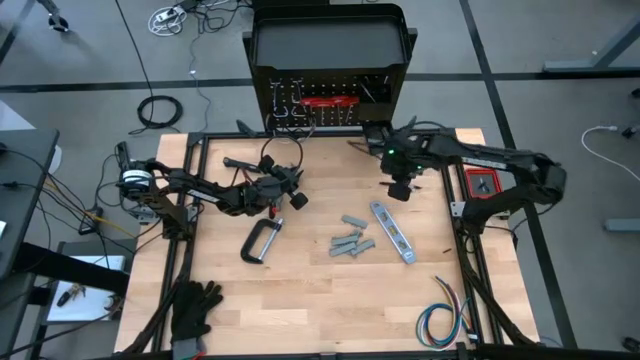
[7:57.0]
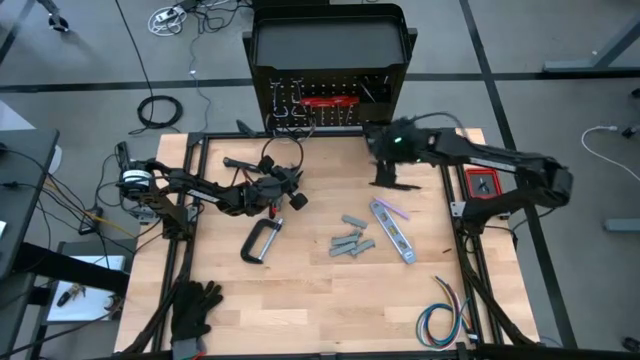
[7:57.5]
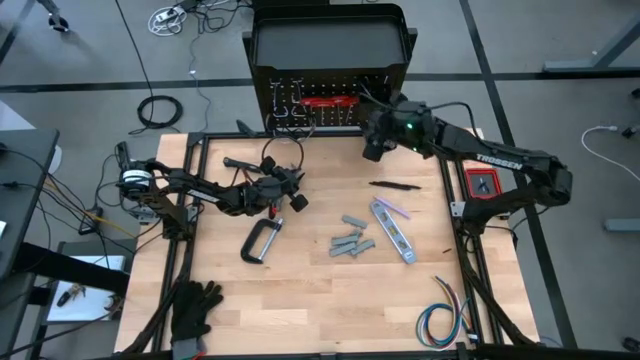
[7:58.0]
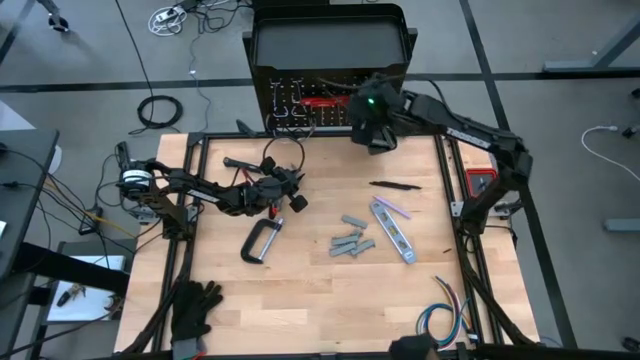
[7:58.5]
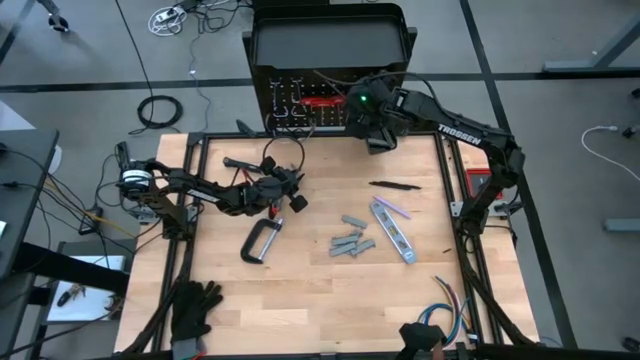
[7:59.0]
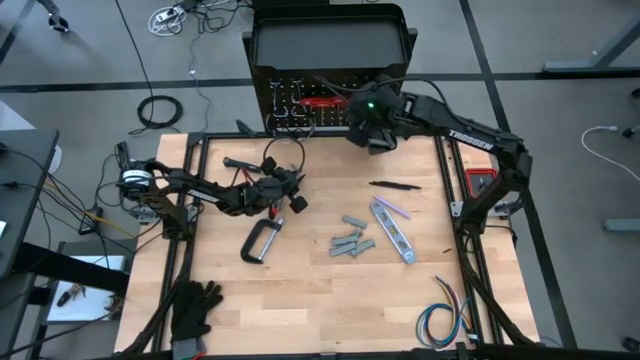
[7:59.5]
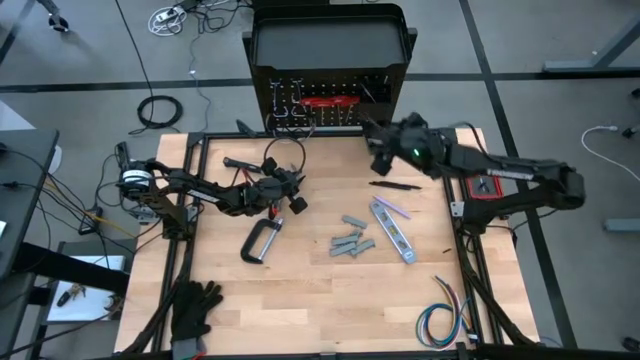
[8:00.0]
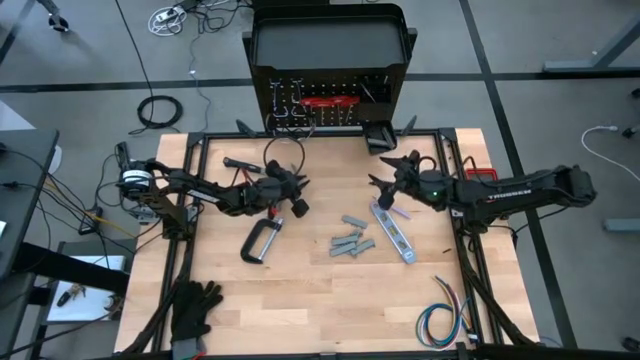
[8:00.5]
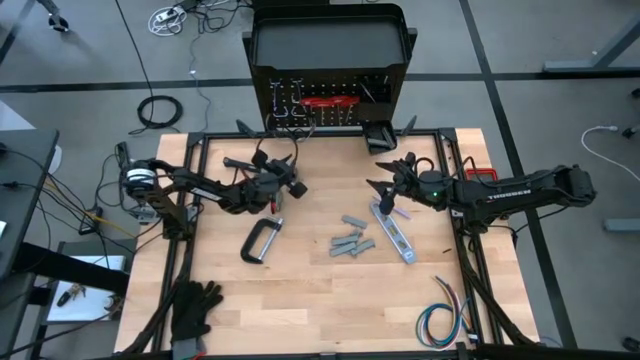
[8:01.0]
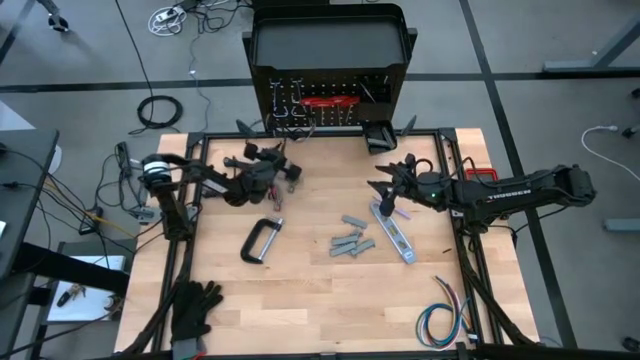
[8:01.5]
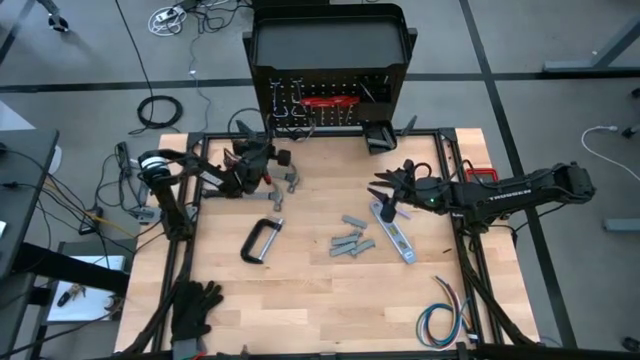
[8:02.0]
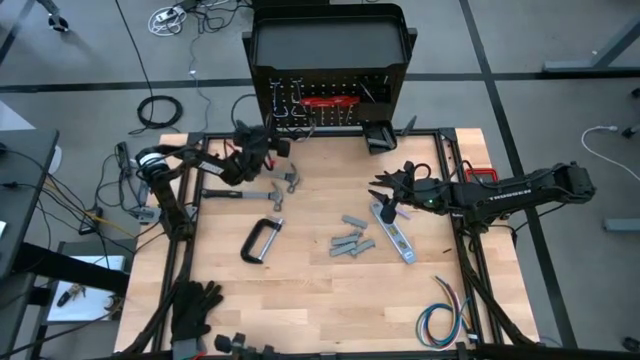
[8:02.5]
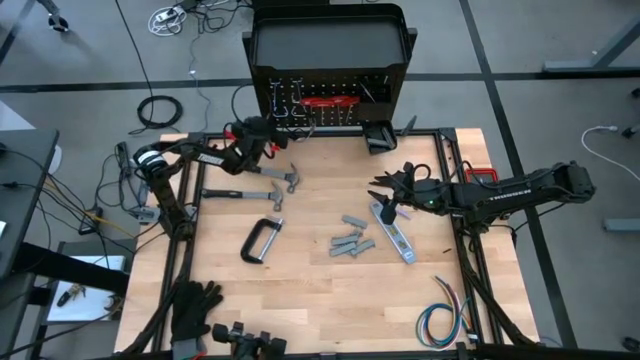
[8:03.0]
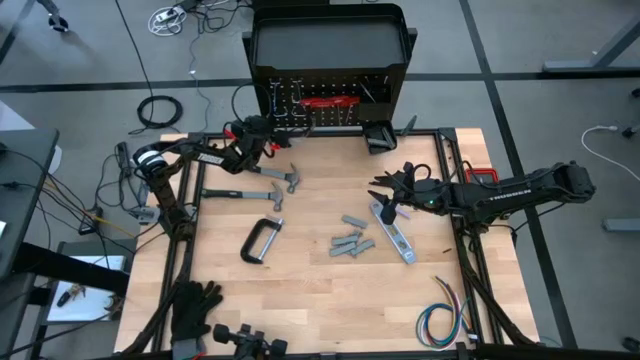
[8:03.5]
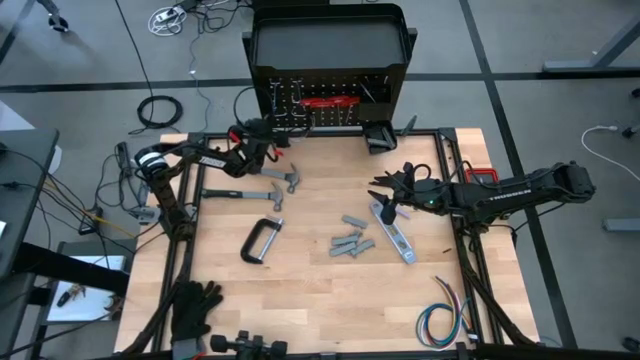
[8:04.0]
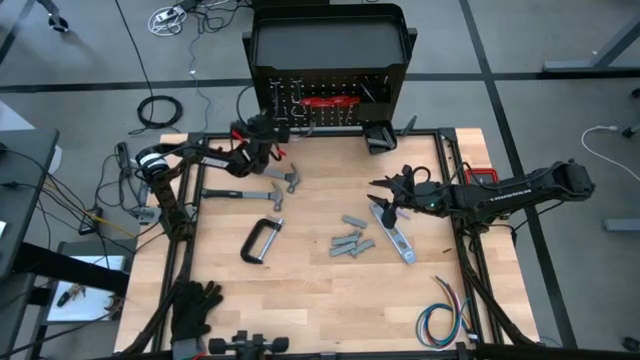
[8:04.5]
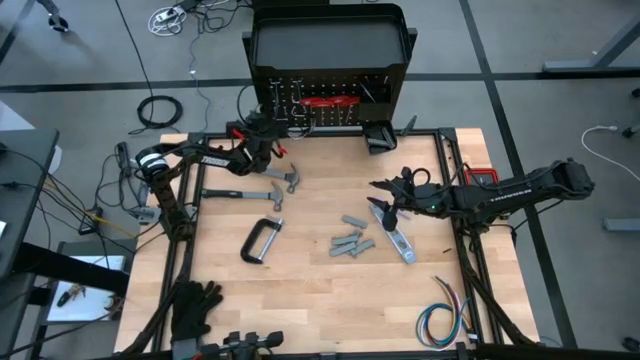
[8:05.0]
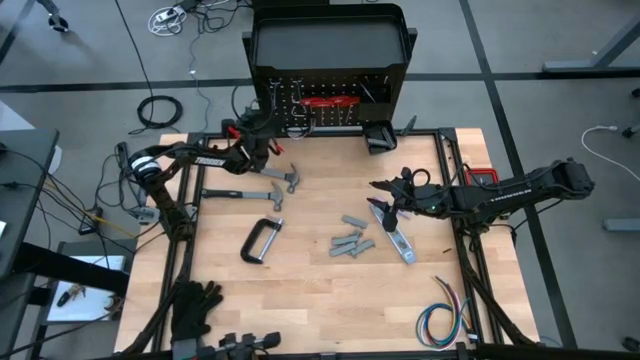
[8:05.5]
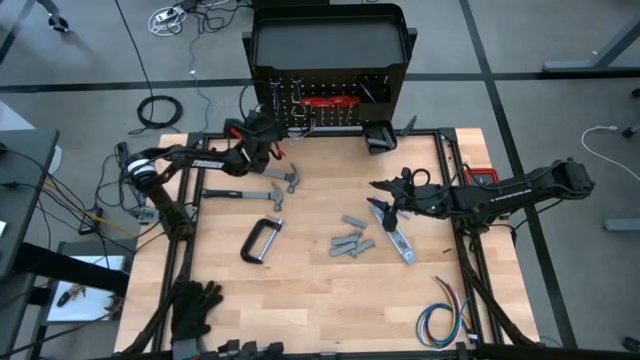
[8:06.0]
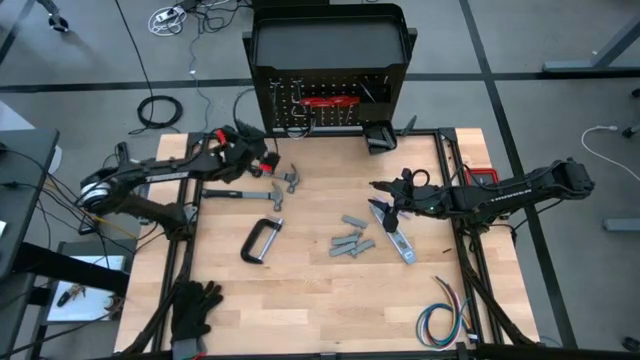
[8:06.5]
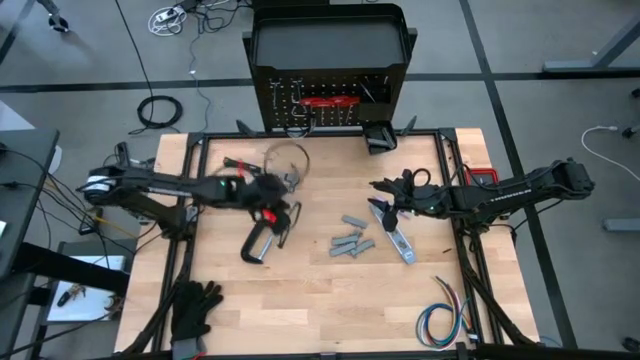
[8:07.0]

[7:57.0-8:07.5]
Task: Hang tools onto peg board
Unhang the left glasses

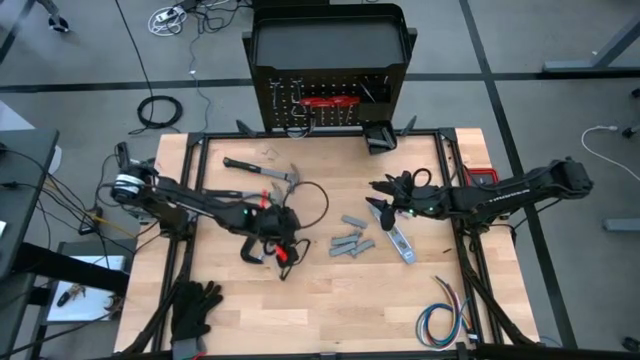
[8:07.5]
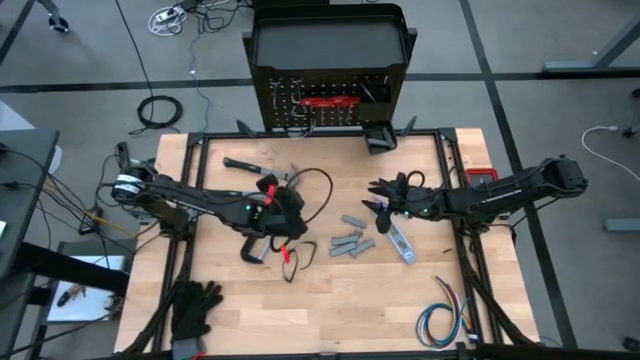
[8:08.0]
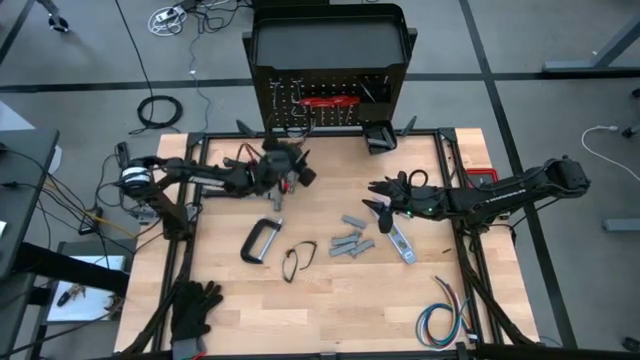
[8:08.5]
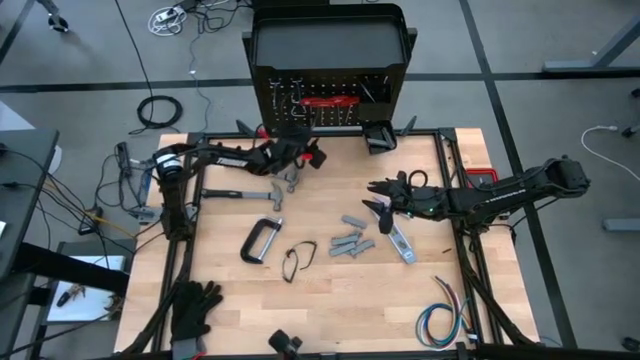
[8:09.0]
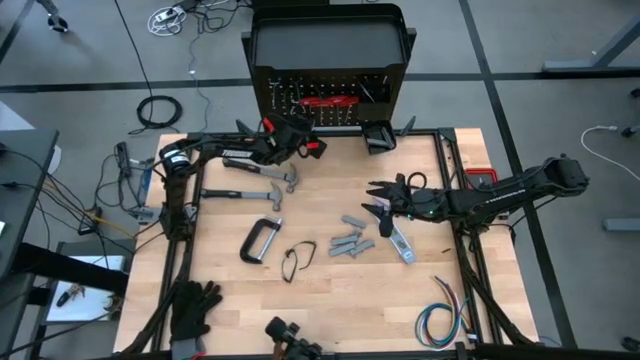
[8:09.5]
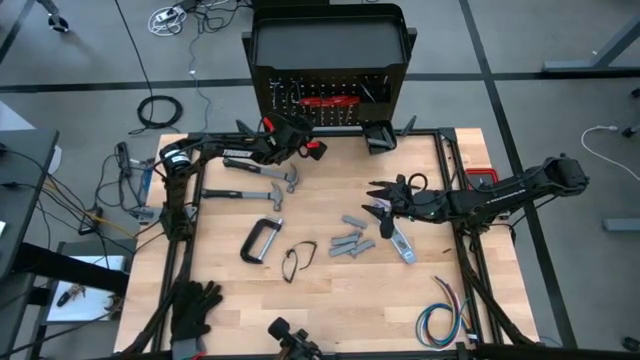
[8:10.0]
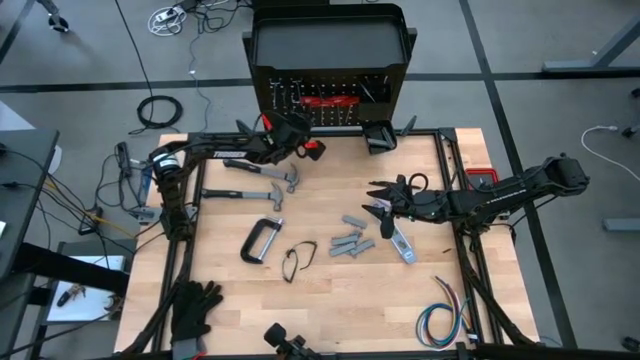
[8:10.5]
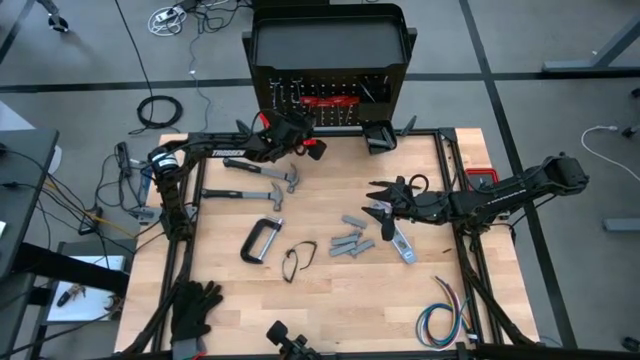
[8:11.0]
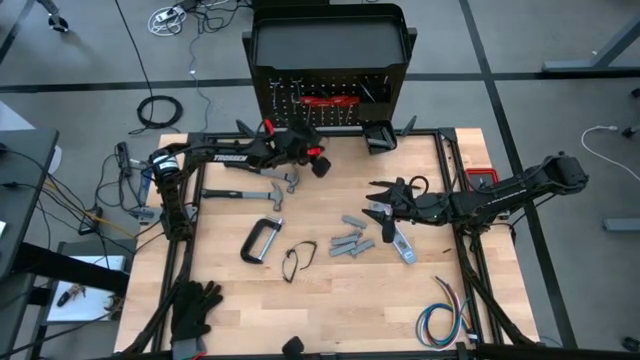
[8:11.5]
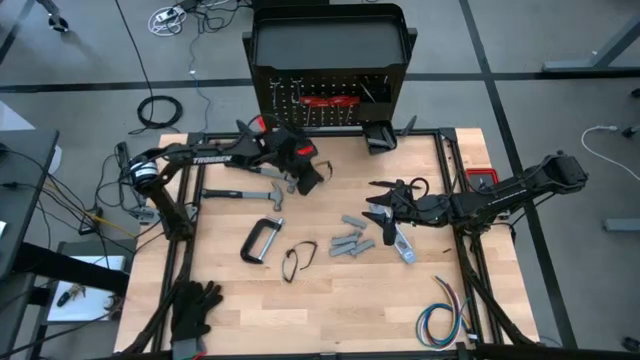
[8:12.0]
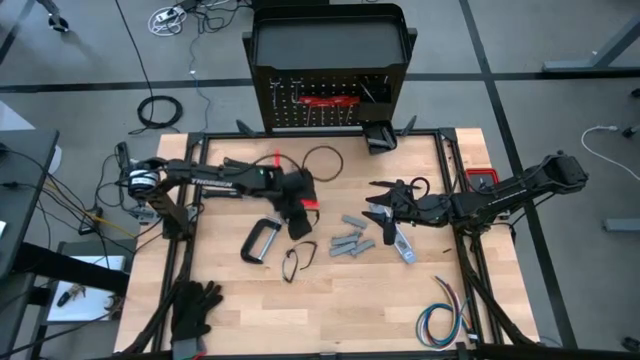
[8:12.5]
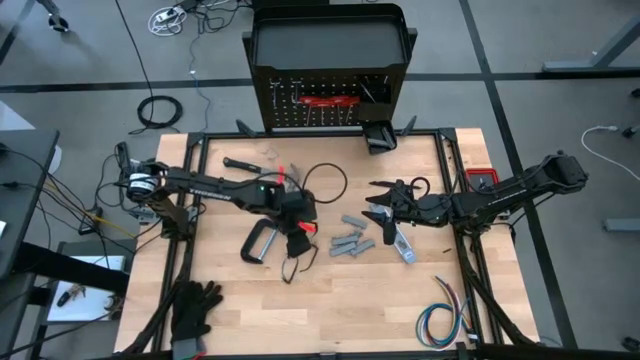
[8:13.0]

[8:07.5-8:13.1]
Unhang the glasses

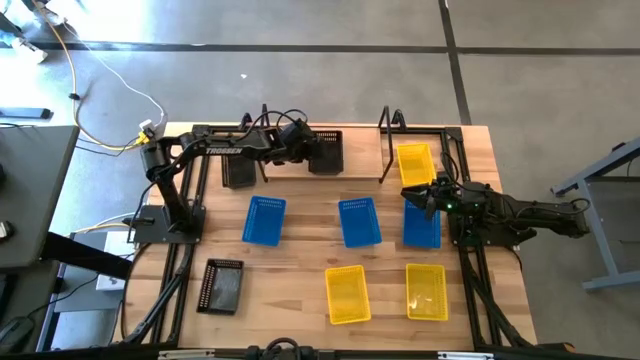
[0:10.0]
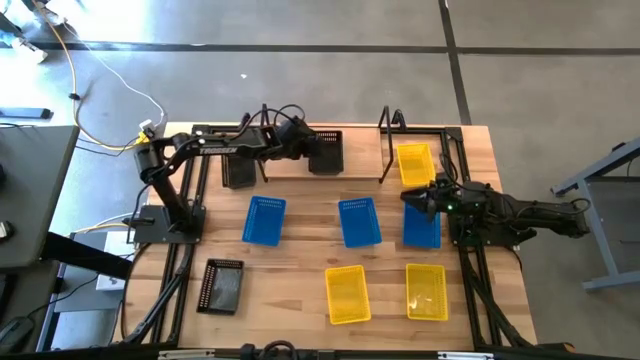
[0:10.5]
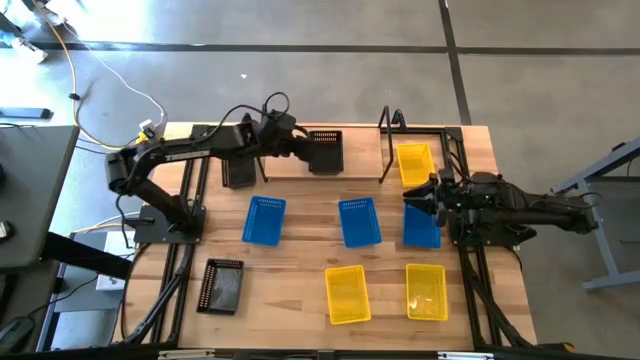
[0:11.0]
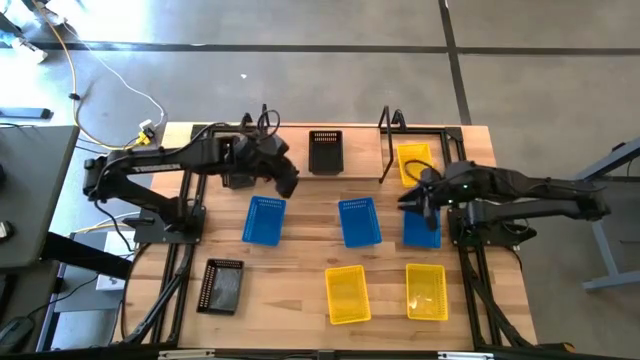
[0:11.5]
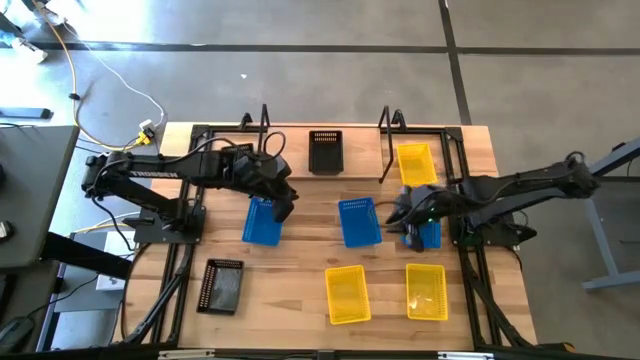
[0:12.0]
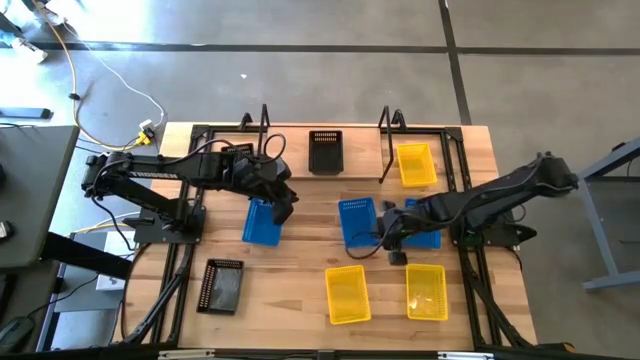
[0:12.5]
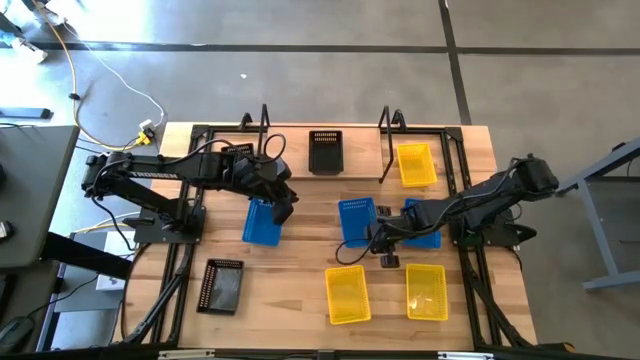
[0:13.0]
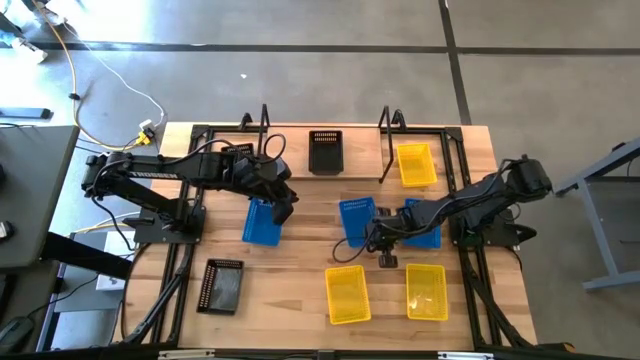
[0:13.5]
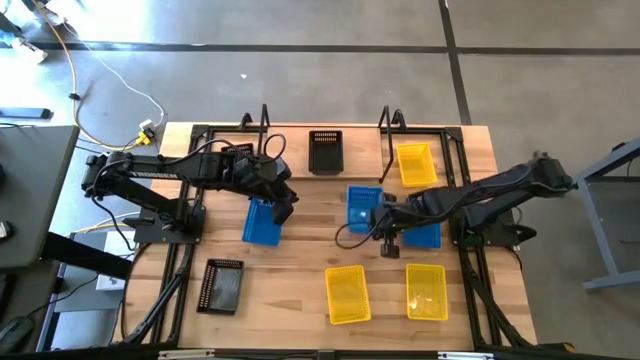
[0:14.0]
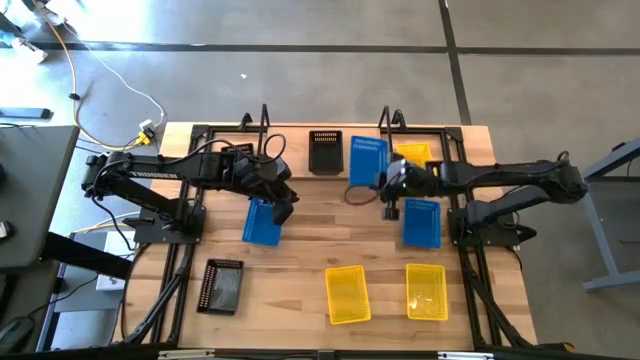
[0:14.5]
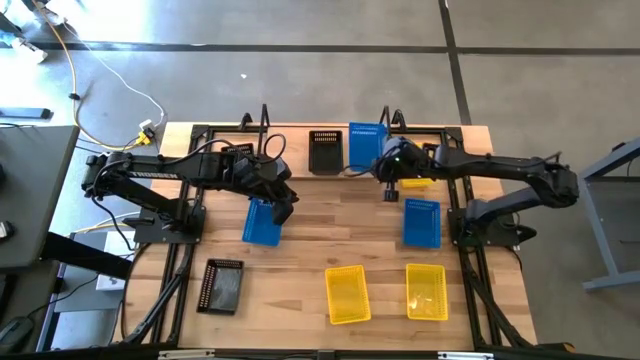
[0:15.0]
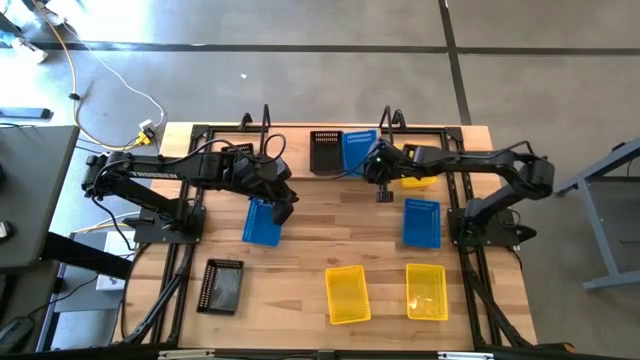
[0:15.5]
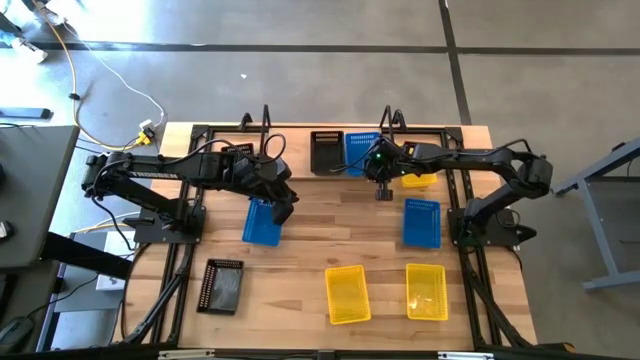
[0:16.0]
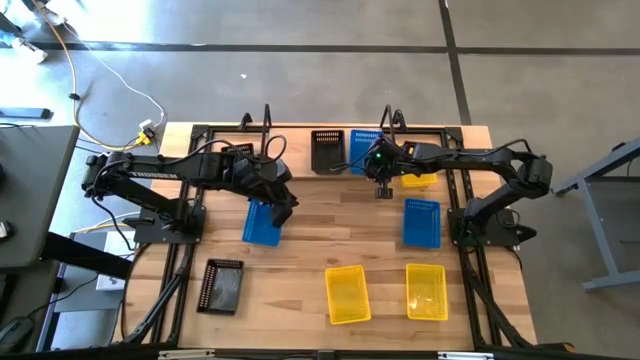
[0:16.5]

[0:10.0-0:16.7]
Task: Stack baskets on shelf by color
Put the middle blue bin on the shelf
